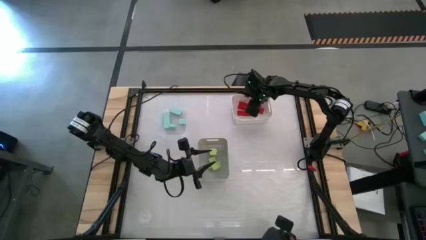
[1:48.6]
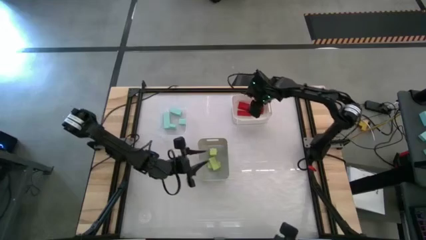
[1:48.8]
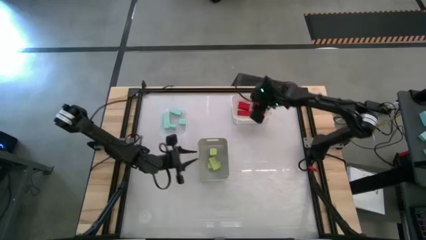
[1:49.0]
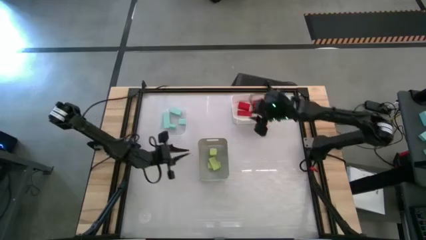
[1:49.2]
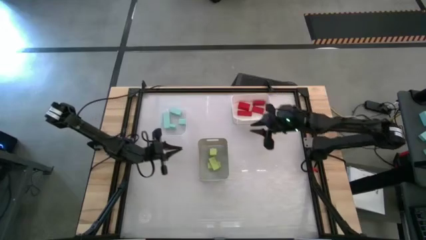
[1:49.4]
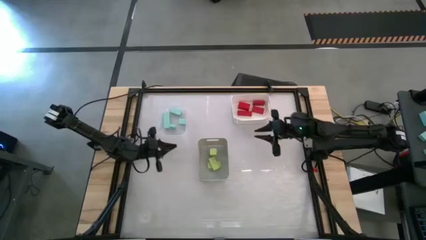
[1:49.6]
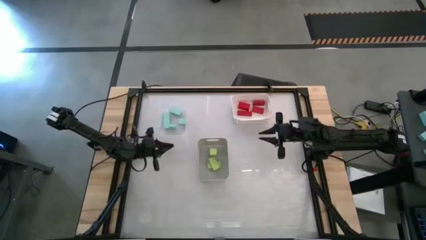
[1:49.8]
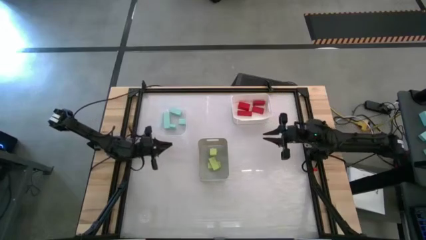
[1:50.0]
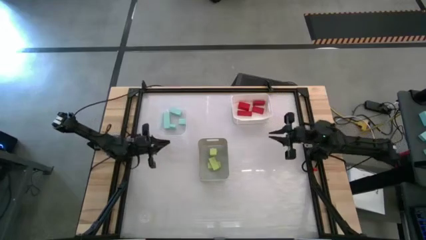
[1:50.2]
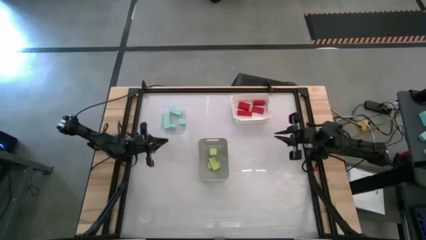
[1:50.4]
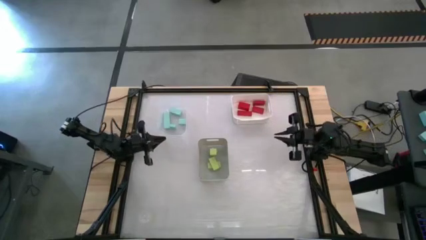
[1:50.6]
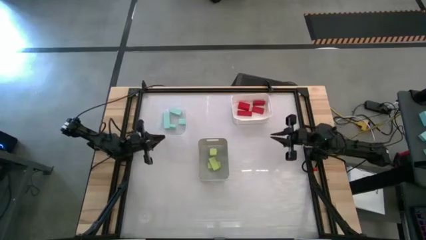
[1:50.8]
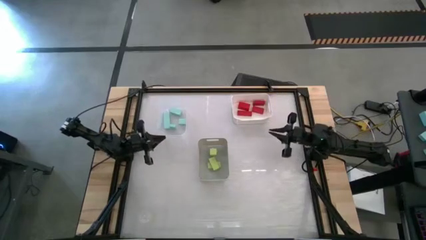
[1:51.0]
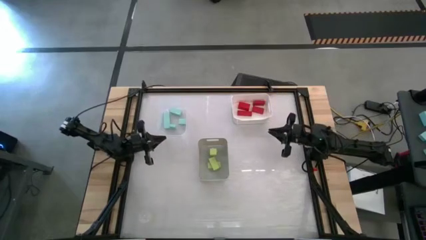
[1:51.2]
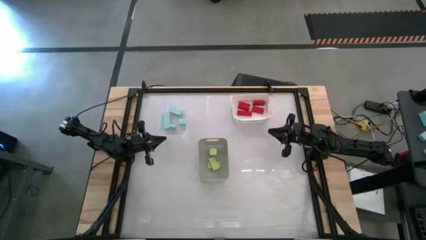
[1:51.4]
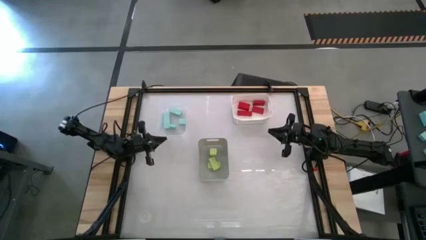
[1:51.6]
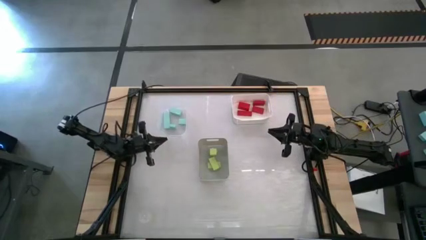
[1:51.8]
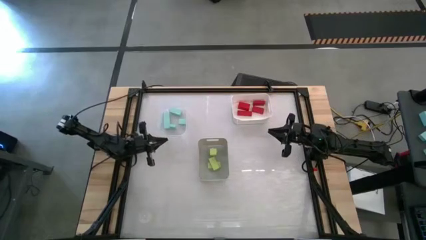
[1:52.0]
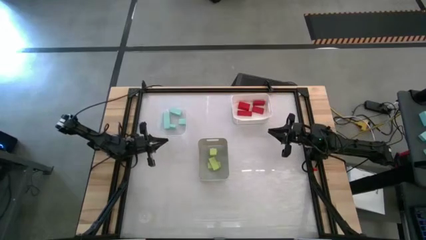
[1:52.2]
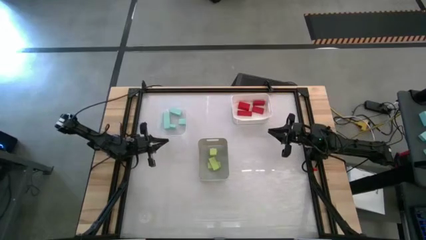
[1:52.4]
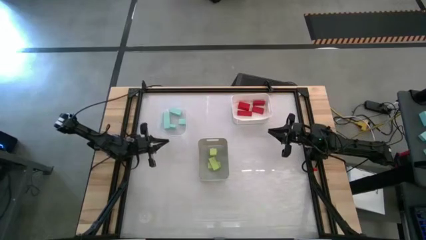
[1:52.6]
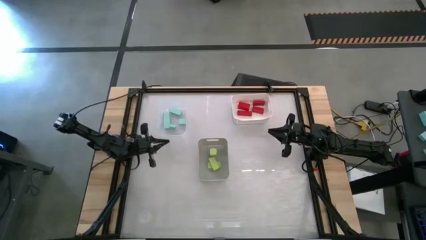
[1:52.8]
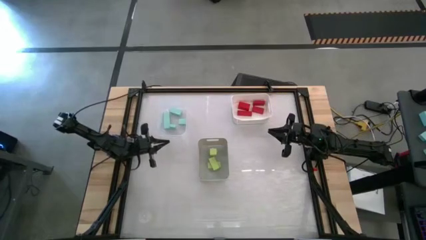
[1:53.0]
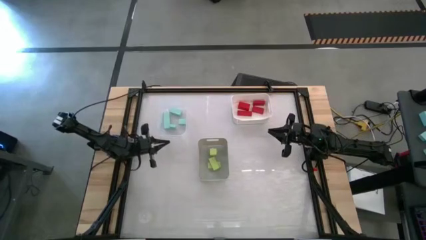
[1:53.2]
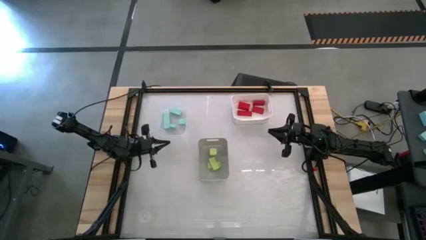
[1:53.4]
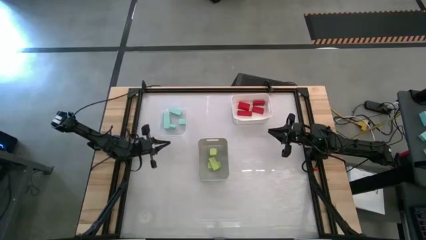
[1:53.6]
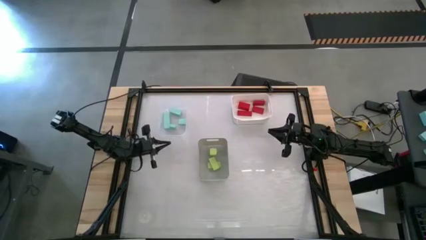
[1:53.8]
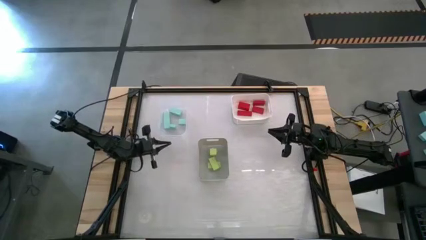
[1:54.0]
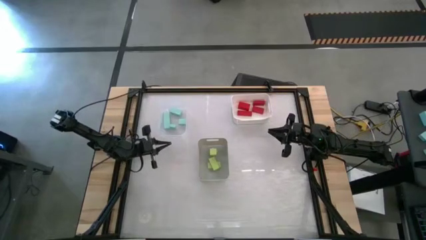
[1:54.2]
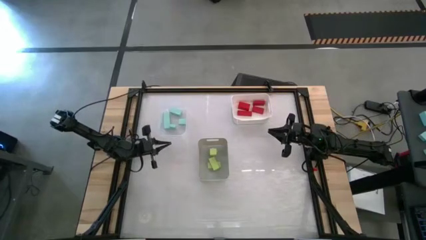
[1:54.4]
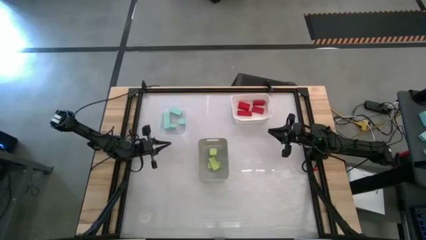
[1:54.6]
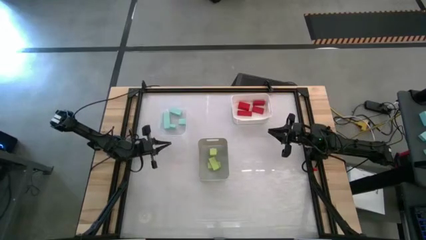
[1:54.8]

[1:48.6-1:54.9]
Task: Sort & place blocks by color
Return to home position

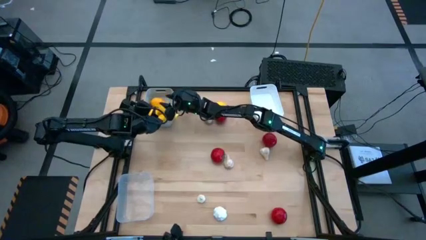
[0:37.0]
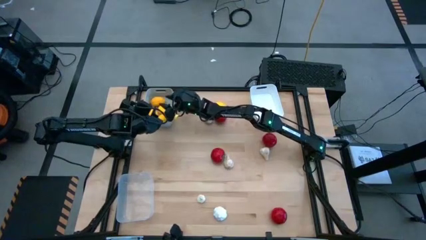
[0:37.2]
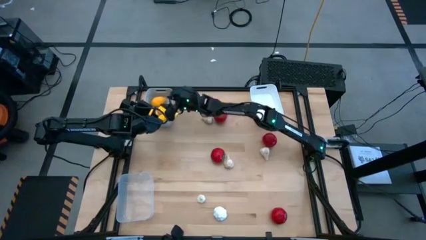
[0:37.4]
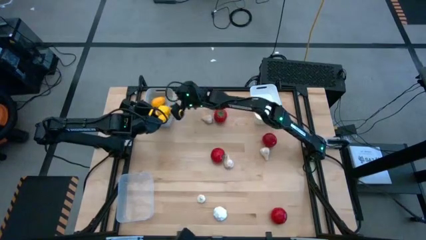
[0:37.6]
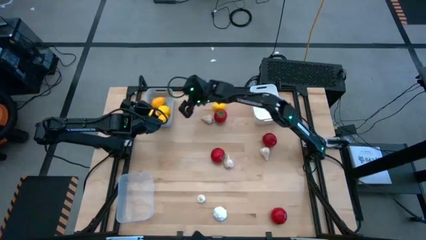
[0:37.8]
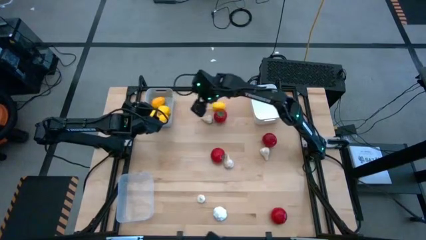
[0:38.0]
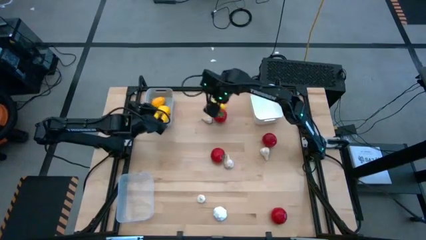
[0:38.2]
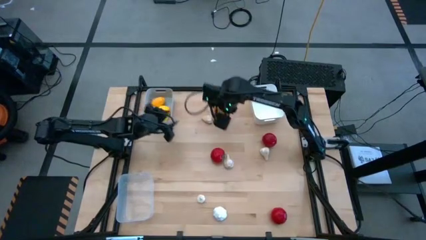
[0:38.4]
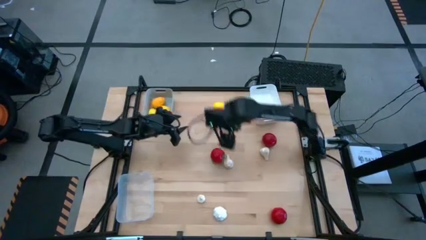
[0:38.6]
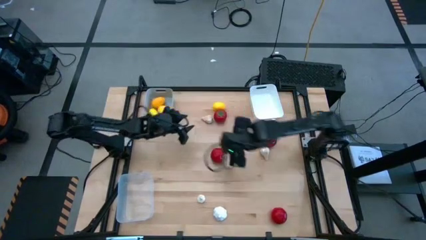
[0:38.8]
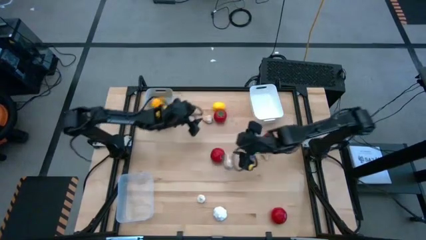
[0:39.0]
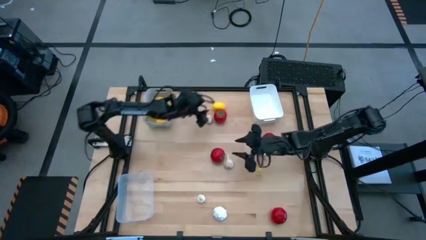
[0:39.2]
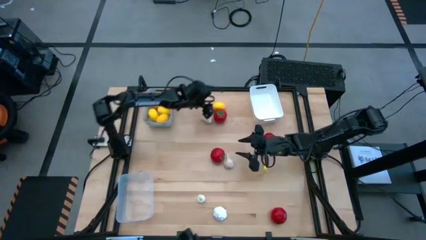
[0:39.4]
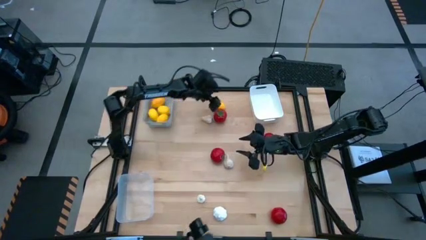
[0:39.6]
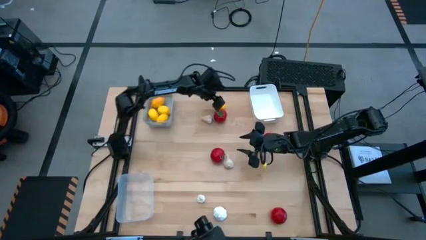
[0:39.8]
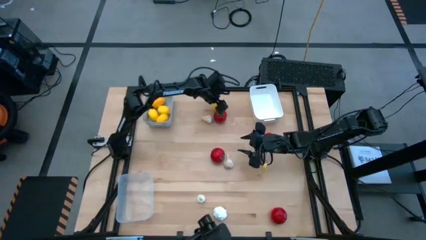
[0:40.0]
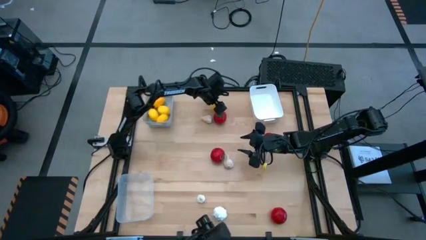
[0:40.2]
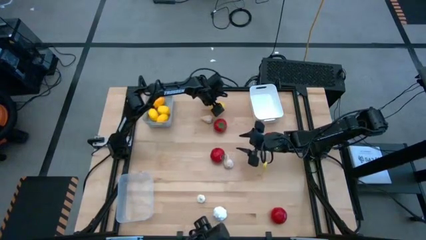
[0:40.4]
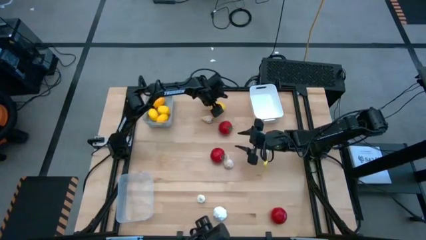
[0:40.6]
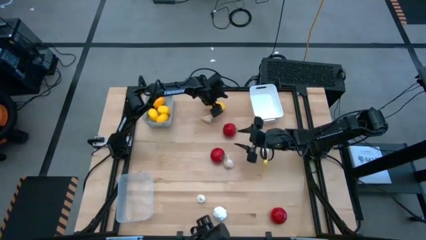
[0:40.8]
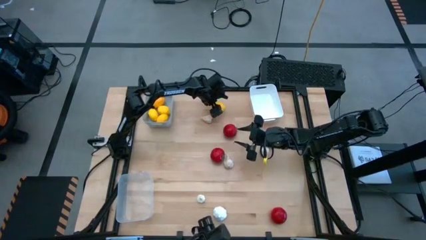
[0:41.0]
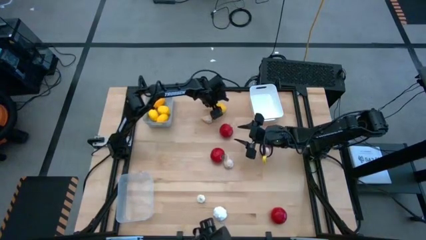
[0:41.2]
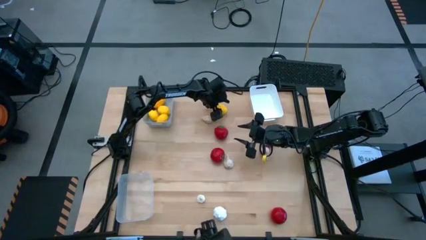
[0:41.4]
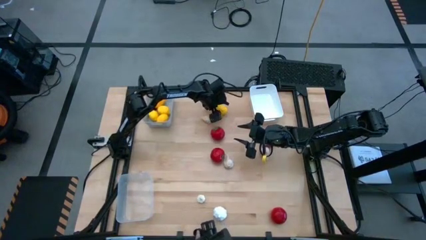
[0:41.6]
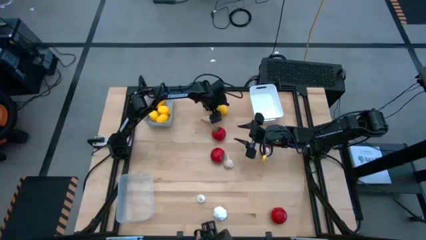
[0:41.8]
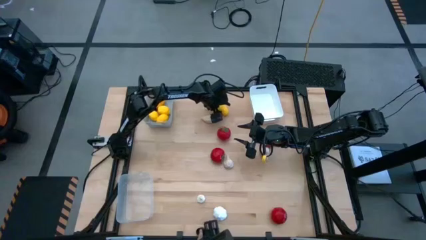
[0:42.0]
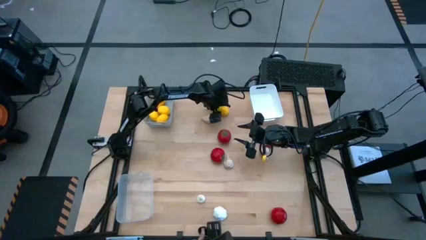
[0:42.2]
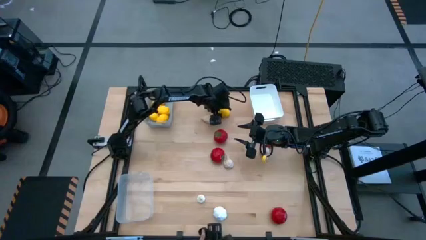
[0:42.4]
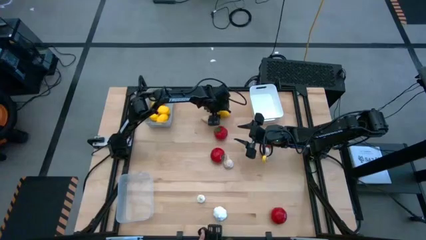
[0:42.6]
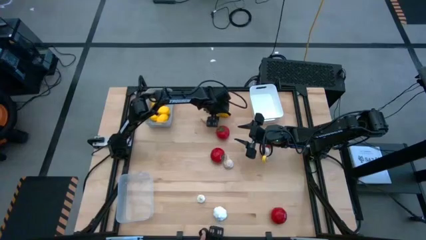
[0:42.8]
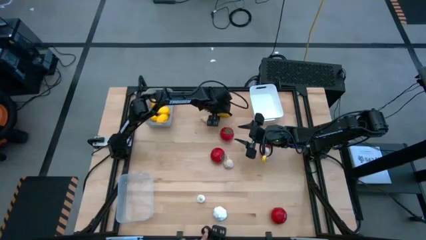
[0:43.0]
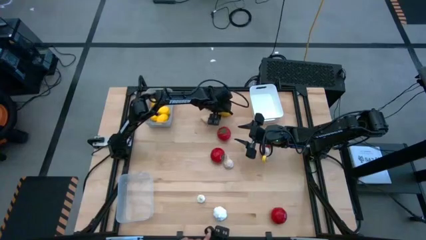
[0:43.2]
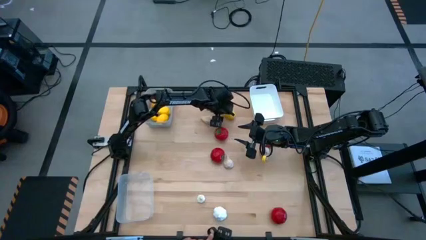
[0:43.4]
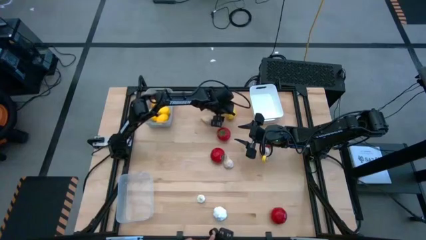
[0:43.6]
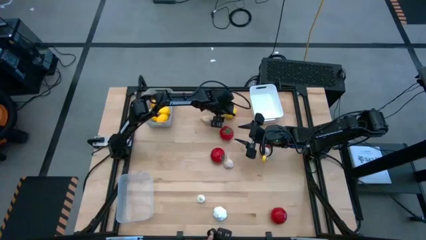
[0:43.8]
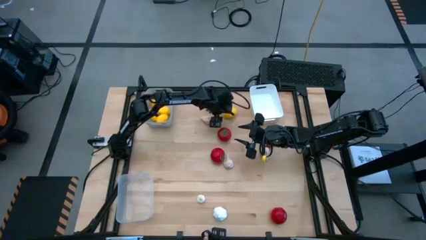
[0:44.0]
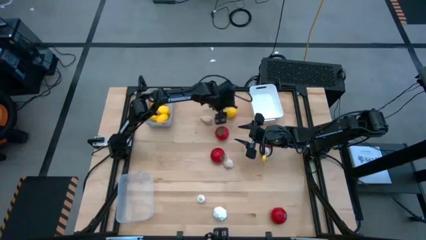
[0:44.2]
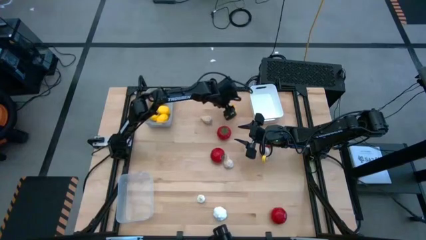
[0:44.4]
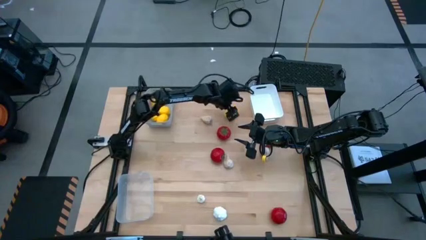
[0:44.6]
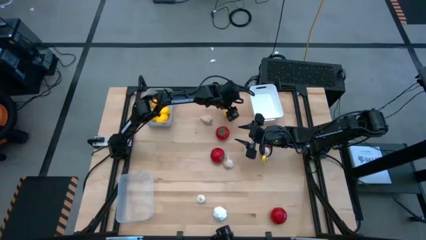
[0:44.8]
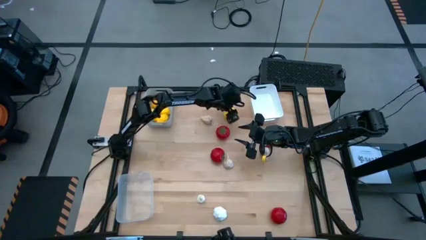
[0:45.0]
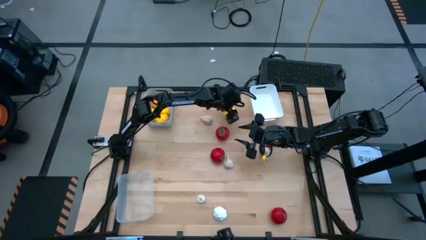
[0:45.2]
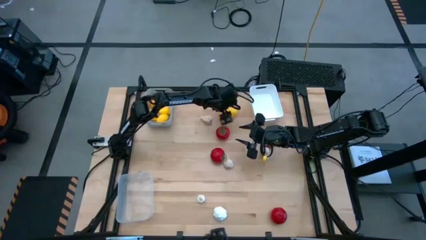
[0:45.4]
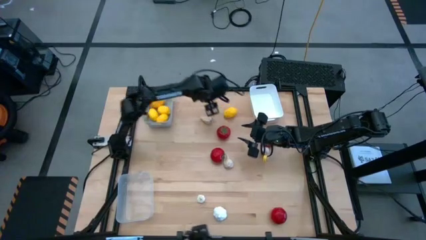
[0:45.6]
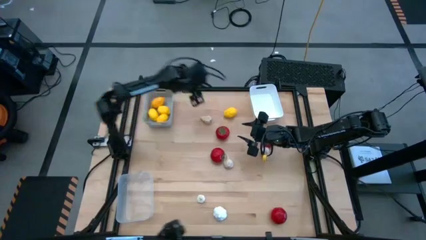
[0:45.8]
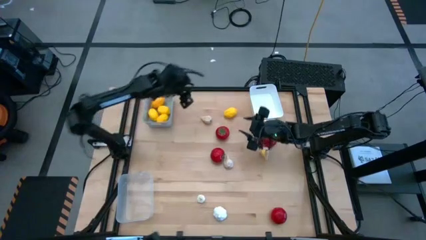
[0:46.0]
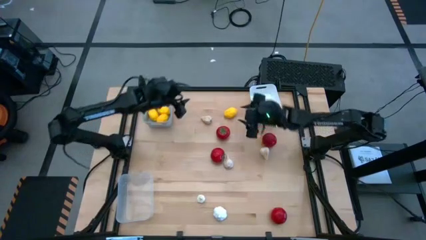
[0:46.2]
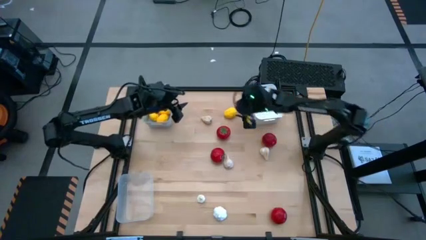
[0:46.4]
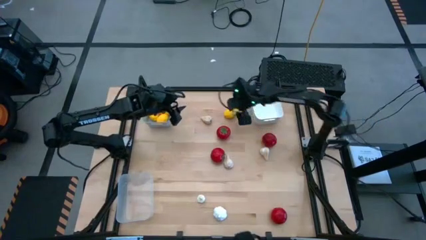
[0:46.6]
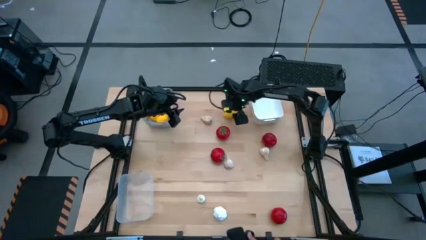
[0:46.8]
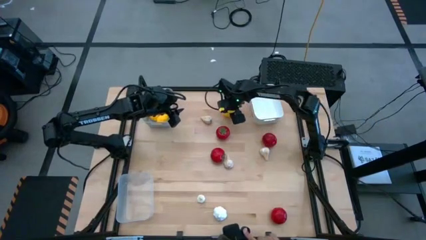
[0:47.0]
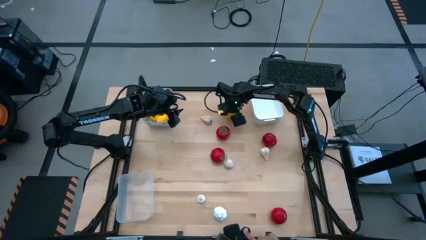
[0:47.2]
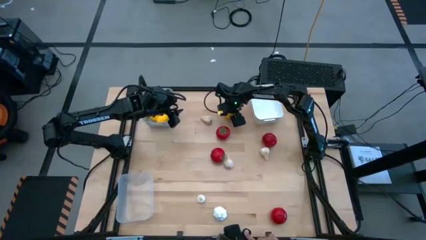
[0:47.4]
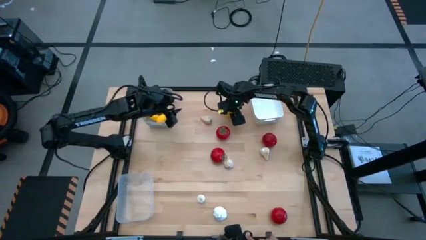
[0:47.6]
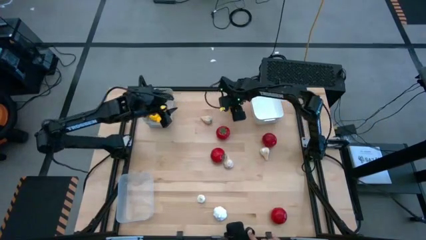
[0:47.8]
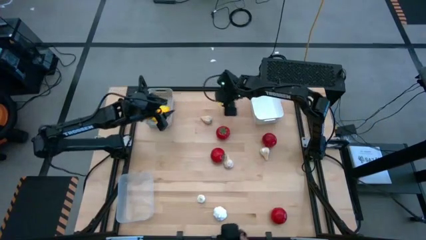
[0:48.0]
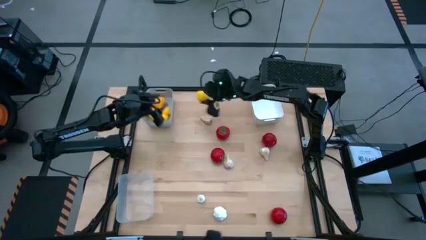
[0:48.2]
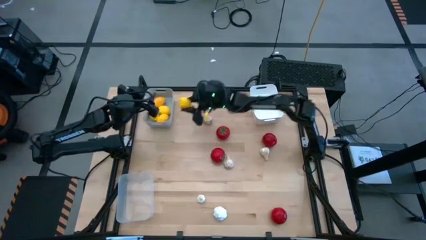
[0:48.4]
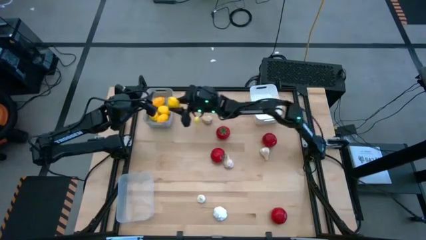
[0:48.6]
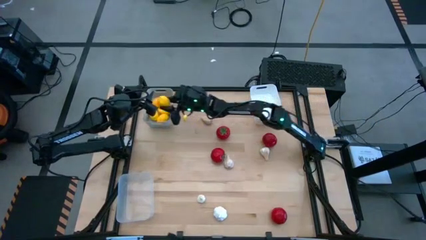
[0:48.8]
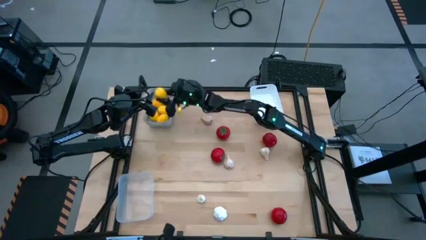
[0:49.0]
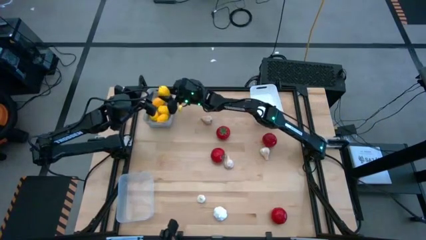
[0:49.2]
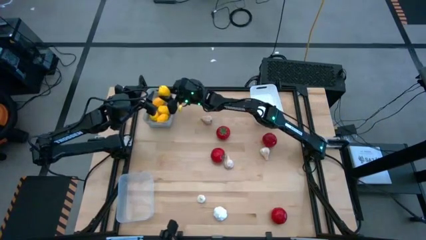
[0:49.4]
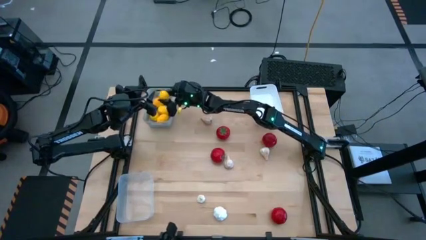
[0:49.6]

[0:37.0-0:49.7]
Task: Sort produce into baskets
Put the yellow lemon into the gray bin
